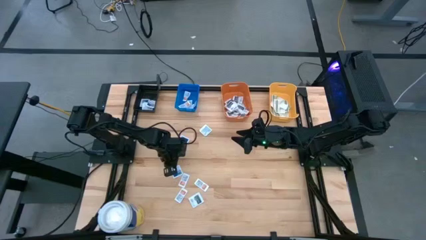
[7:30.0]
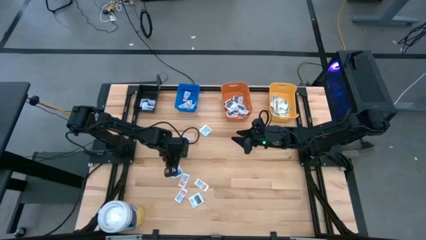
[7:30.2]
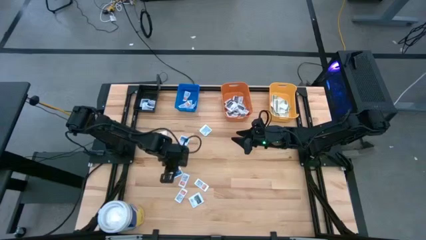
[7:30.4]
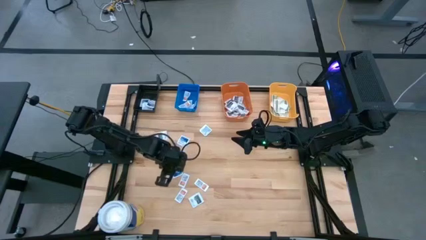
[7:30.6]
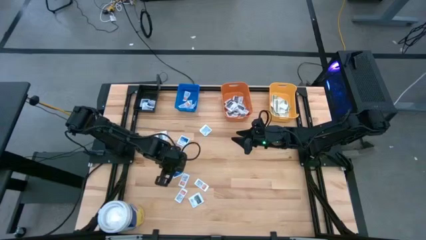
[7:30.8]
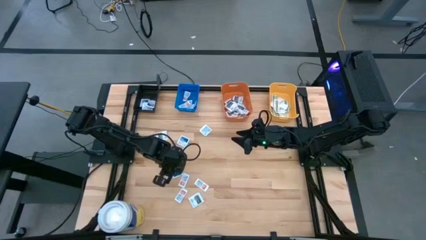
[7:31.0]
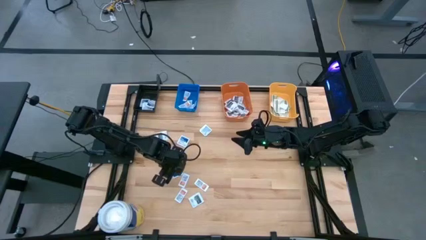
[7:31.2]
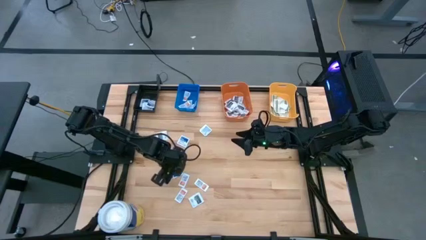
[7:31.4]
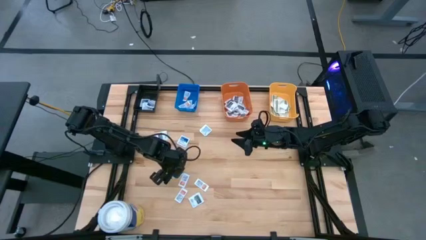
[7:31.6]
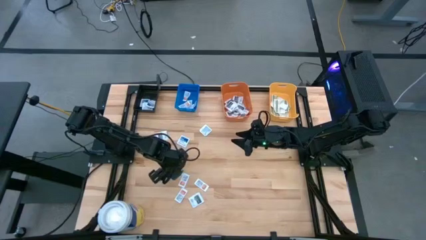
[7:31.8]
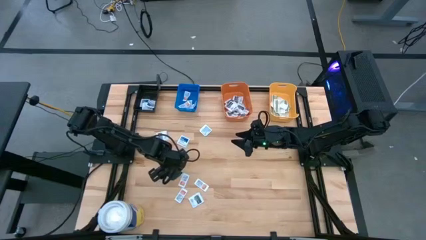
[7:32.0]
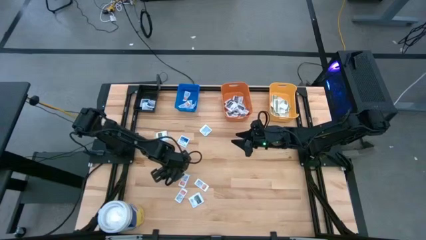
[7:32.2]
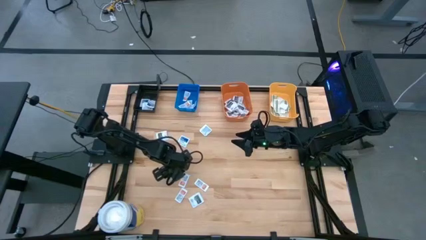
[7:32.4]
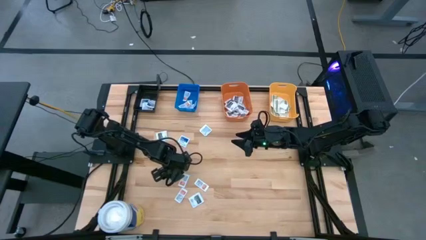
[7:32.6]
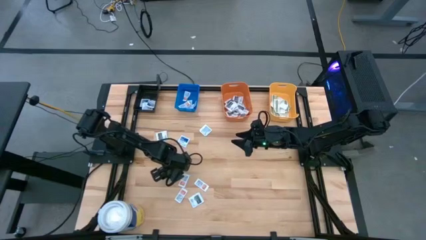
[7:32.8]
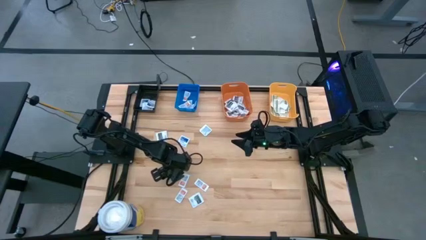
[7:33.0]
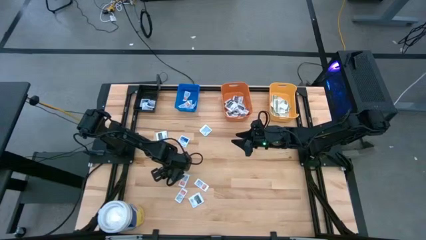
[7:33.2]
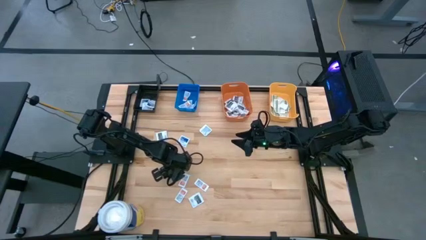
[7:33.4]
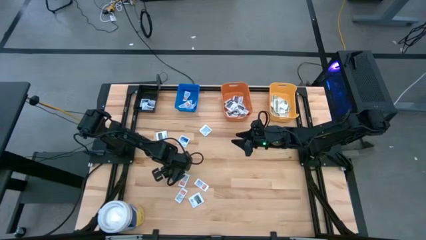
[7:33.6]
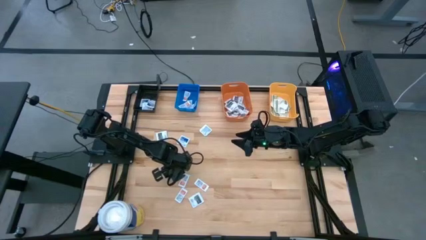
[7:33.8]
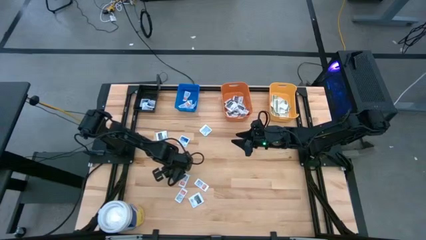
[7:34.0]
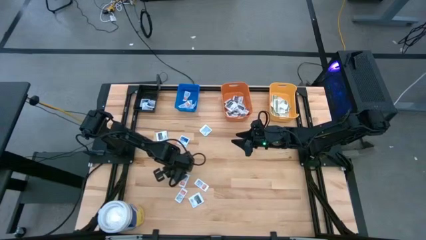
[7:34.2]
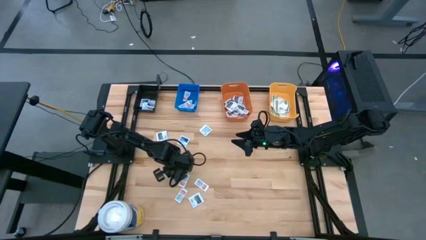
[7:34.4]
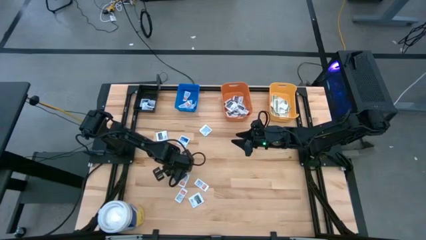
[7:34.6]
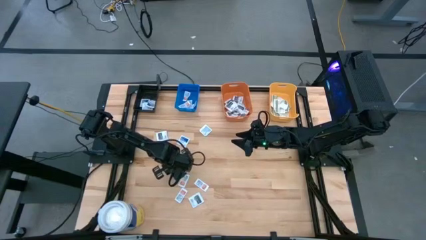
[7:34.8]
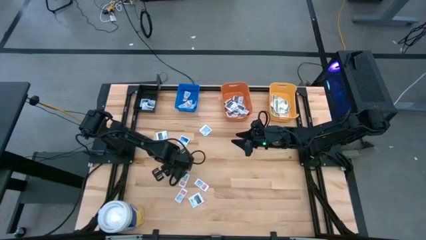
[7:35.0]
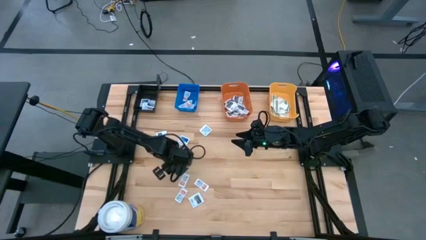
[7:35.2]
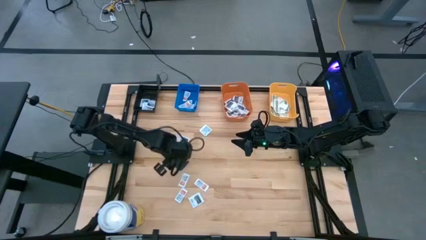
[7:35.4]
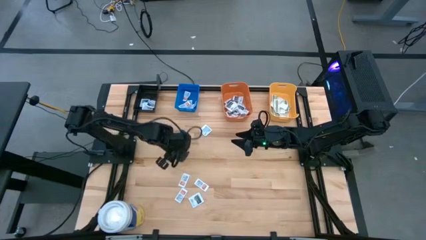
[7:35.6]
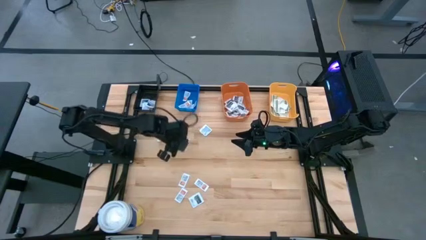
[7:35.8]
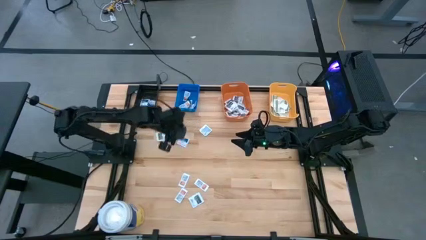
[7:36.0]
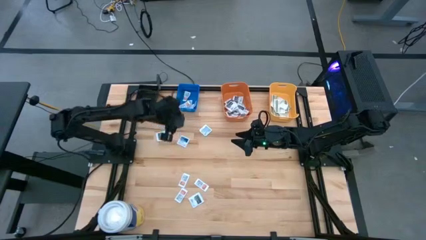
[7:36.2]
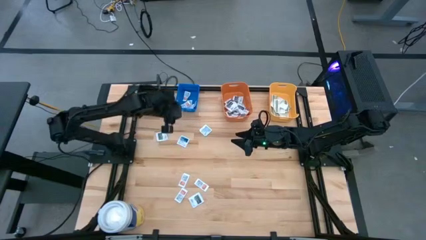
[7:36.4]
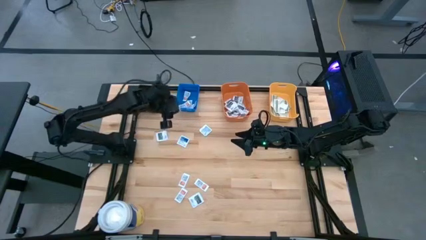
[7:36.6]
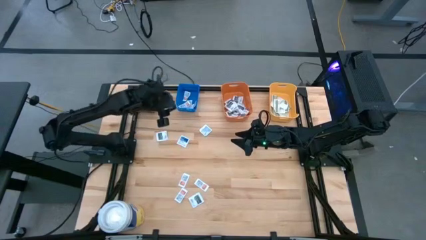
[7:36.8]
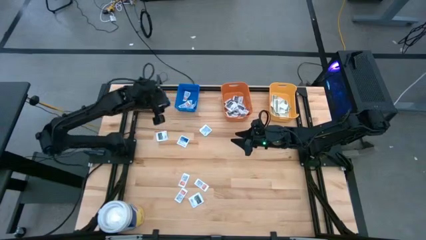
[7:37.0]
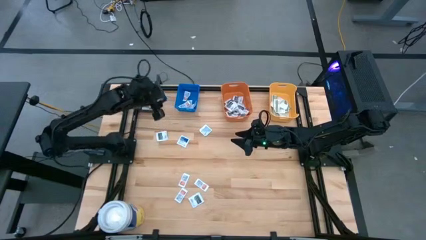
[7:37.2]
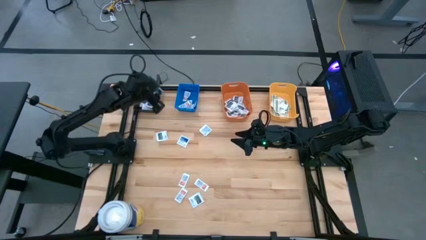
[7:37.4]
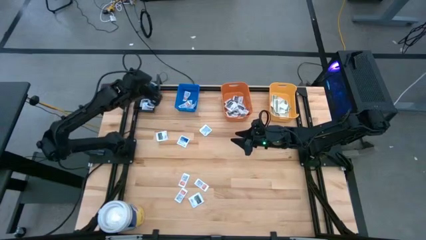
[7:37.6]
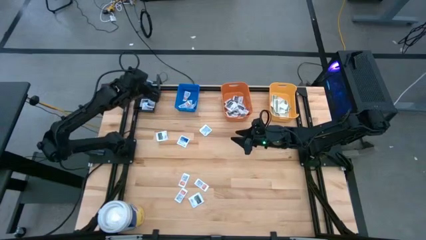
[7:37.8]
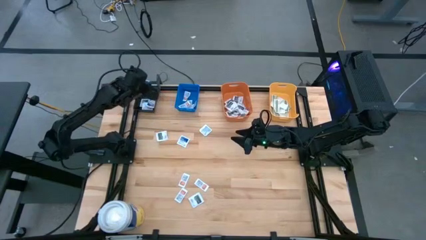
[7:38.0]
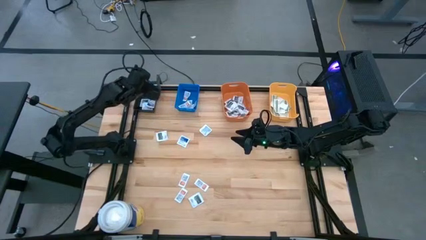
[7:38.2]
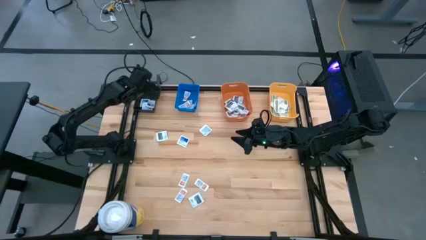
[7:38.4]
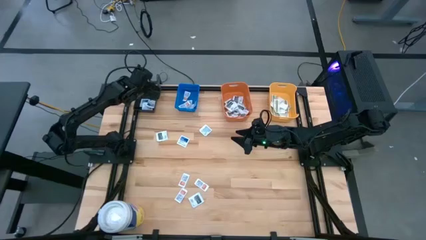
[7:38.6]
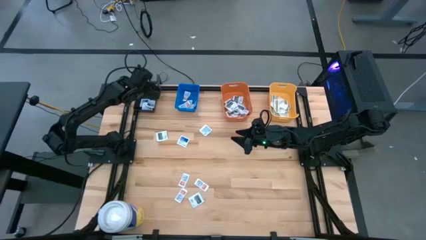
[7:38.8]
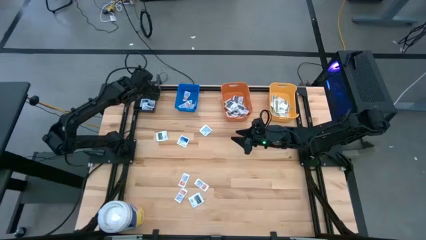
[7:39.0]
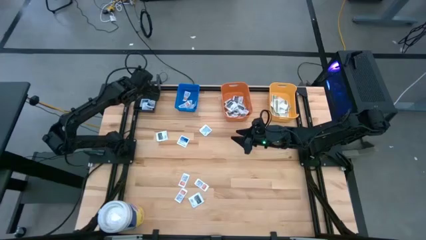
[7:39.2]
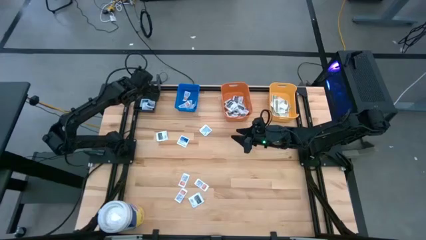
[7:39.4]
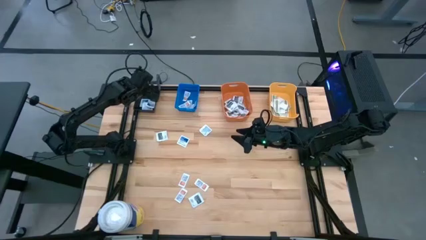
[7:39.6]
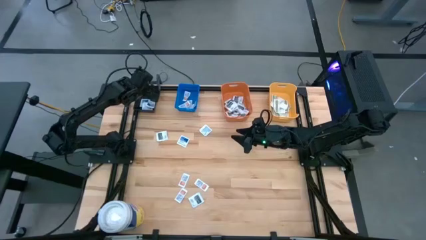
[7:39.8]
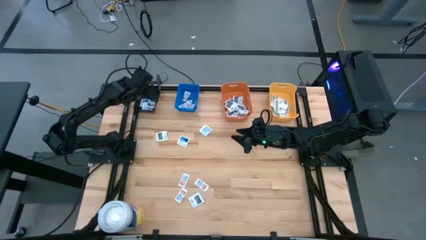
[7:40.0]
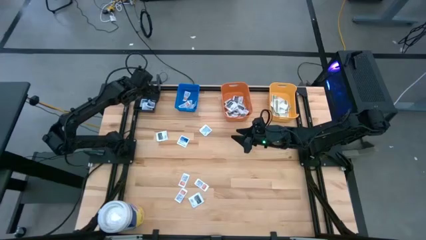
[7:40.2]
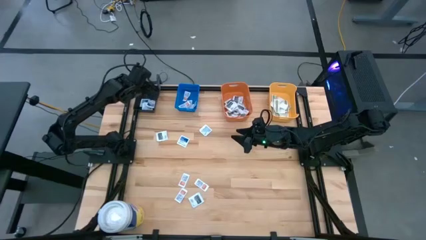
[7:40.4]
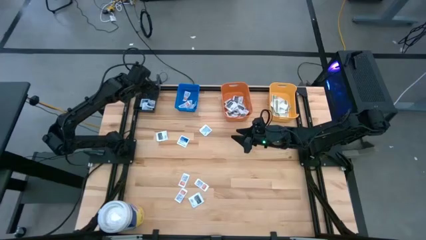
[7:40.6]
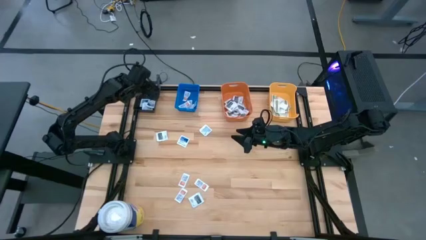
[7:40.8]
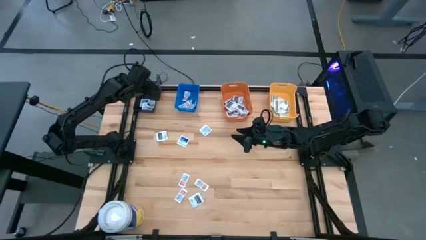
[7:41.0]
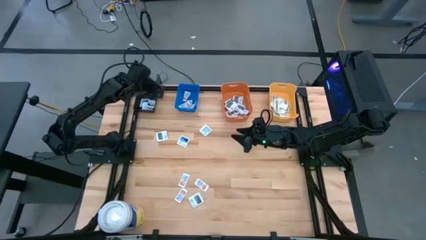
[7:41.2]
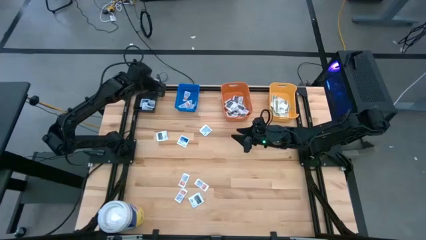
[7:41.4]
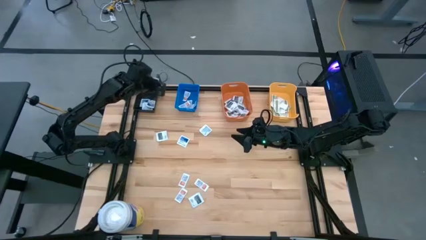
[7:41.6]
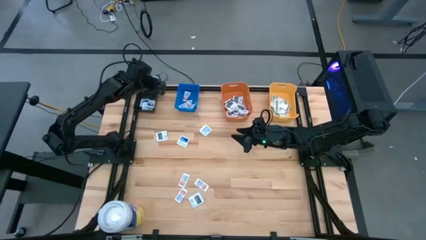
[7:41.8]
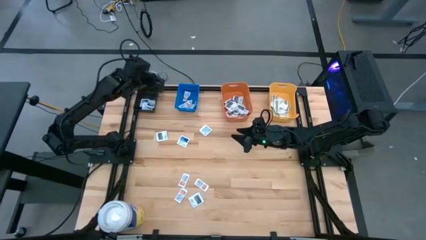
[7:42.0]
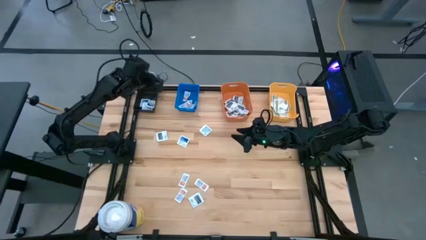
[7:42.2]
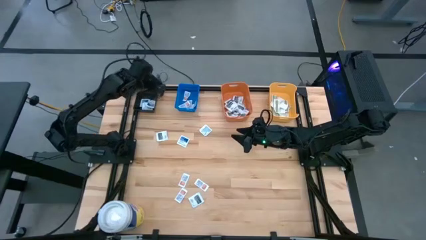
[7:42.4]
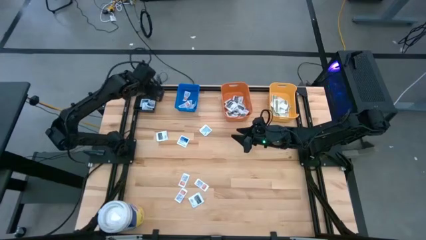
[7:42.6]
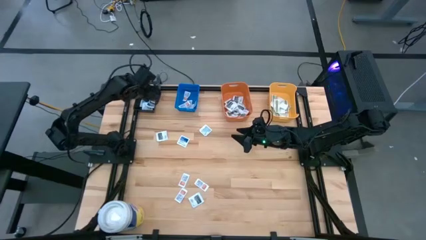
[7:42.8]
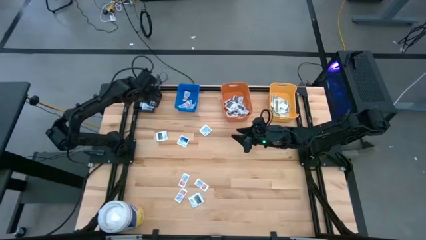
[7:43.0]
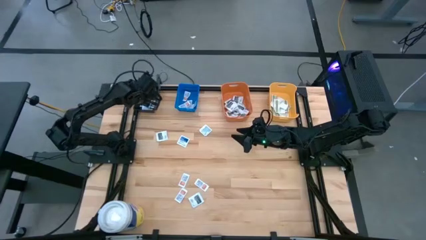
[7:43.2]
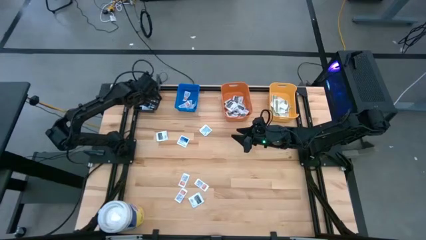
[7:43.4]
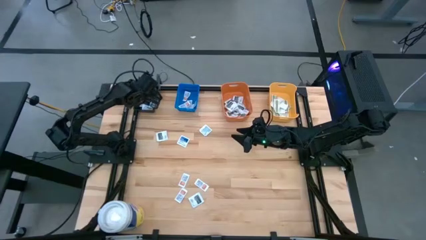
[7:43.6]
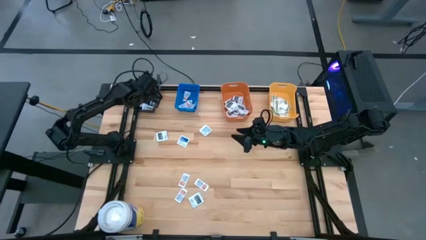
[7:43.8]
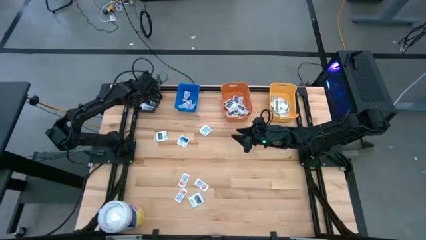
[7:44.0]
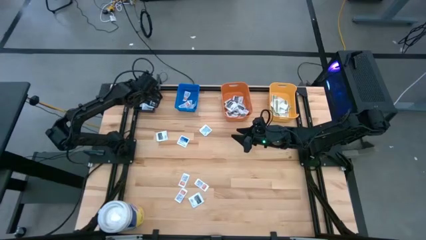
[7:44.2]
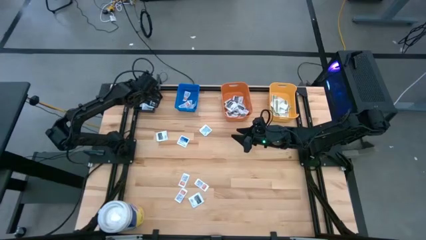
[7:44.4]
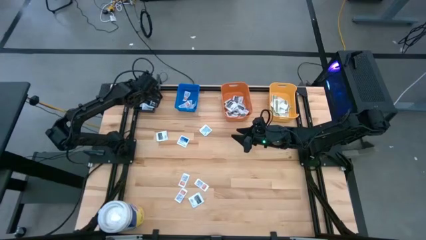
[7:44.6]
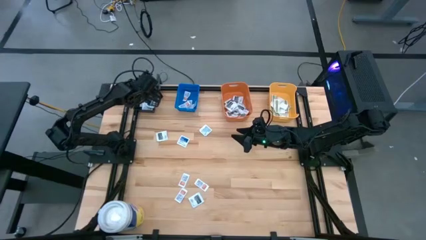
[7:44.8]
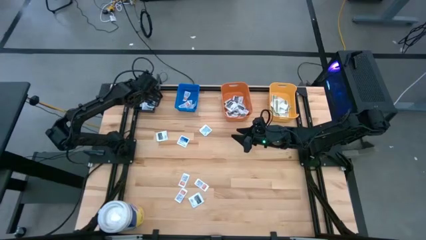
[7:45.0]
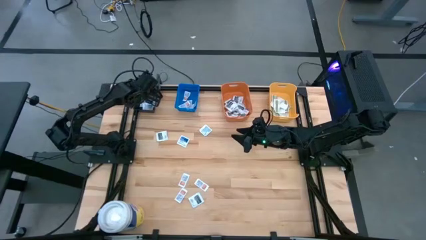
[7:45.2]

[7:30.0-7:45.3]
Task: Pick & Place First Aid Supplies
Put the alcohol pad into the black bin

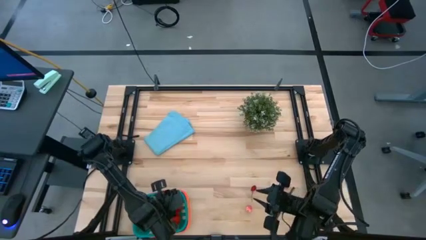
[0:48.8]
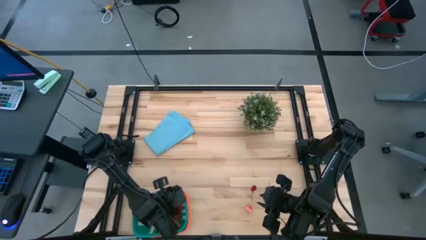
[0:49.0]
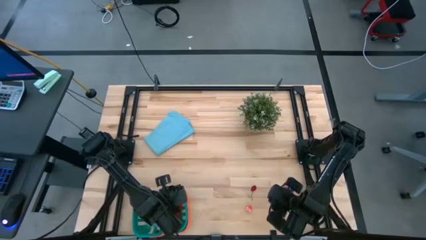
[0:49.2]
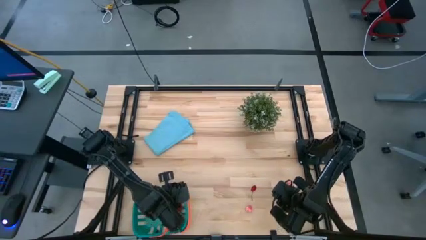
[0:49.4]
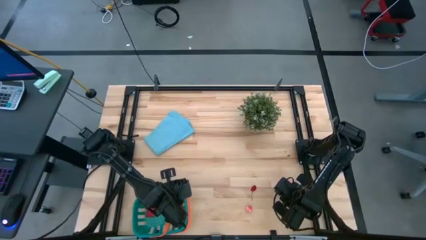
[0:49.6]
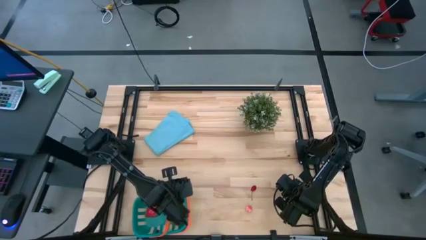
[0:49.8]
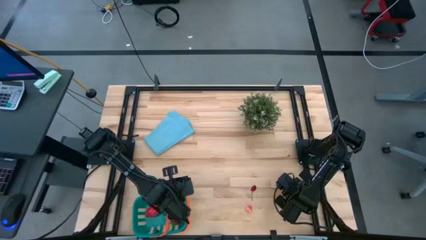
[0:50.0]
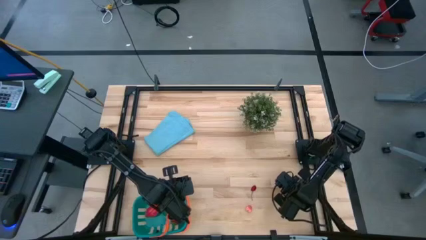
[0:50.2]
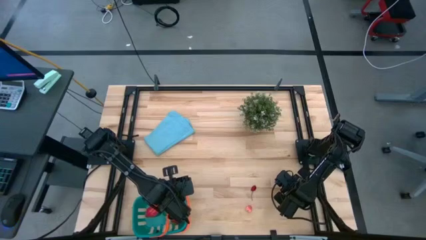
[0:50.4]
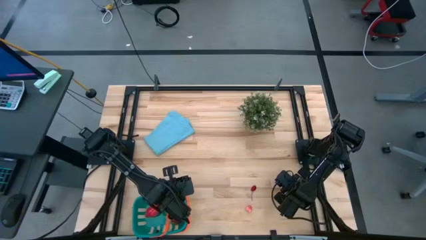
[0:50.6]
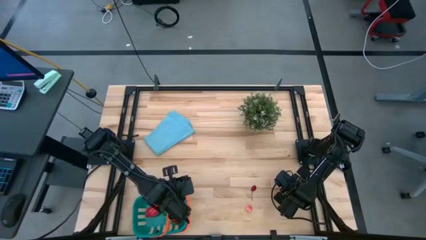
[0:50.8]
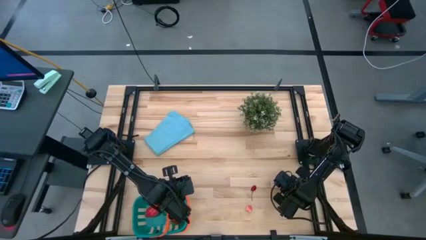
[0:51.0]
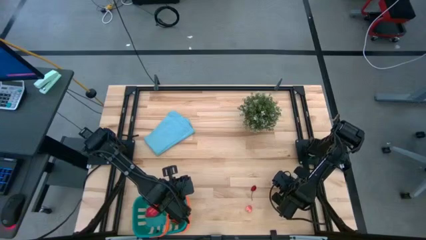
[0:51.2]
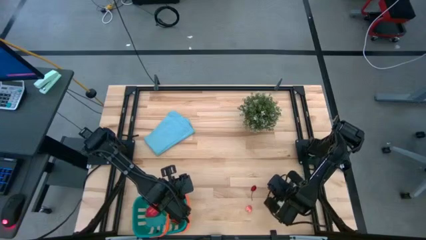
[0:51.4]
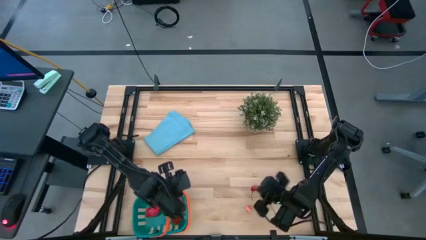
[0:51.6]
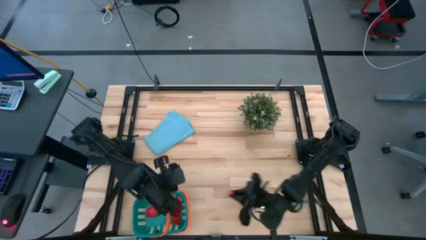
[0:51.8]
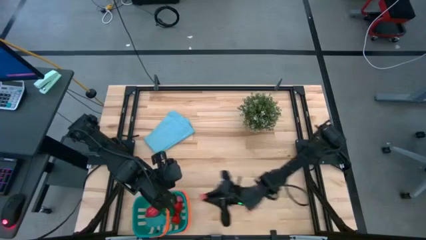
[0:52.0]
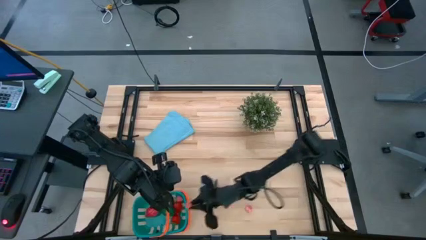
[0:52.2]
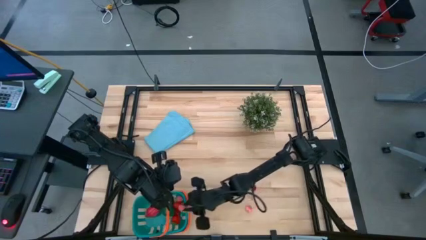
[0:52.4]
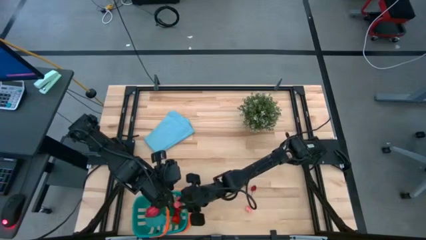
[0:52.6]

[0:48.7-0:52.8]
Task: Pick and placing Produce into tupperware
Put the pink peach into the blue basket
